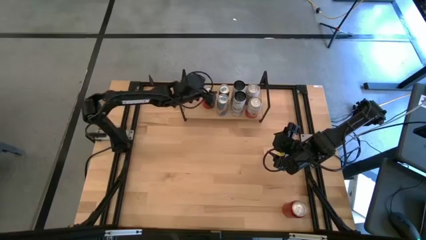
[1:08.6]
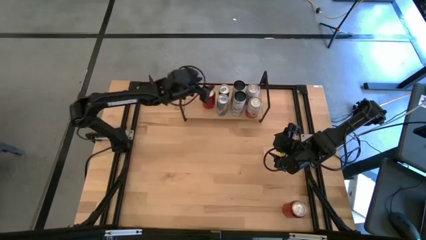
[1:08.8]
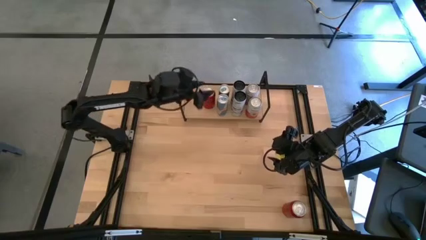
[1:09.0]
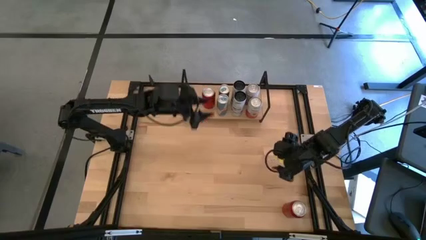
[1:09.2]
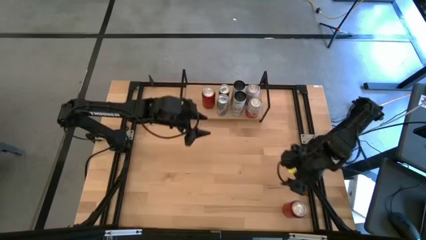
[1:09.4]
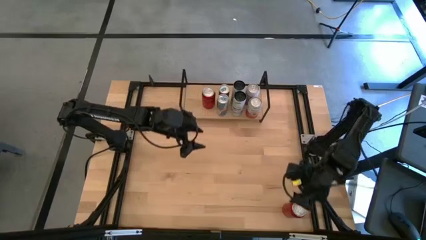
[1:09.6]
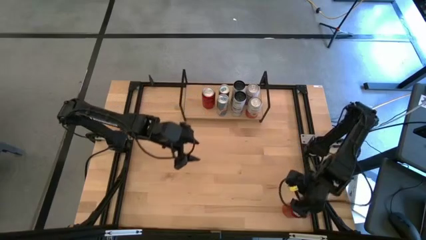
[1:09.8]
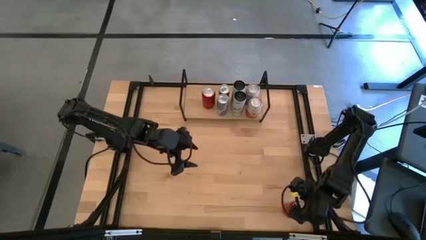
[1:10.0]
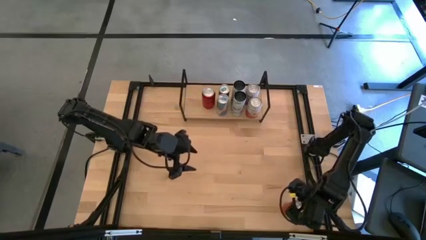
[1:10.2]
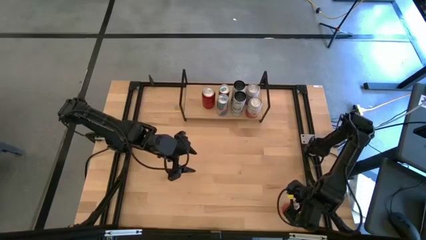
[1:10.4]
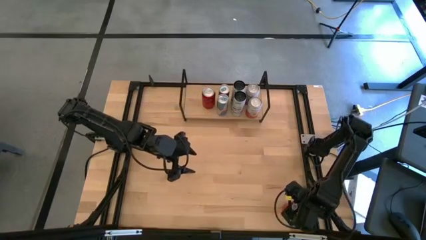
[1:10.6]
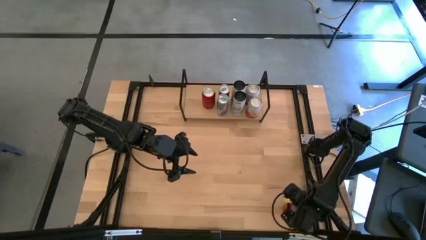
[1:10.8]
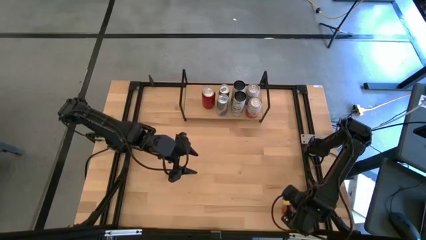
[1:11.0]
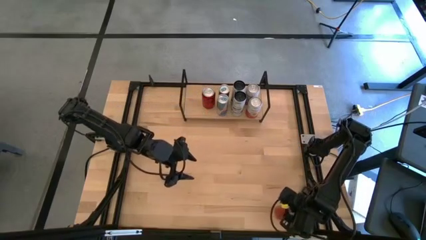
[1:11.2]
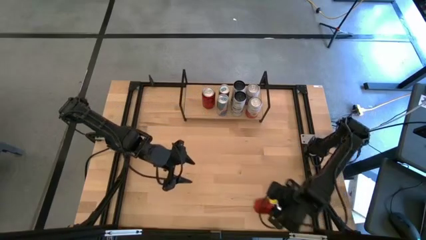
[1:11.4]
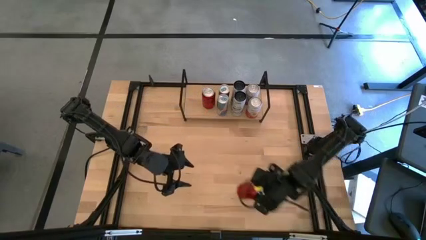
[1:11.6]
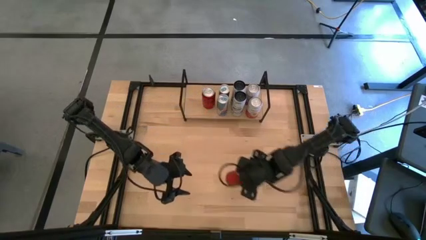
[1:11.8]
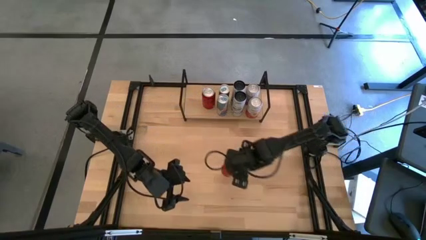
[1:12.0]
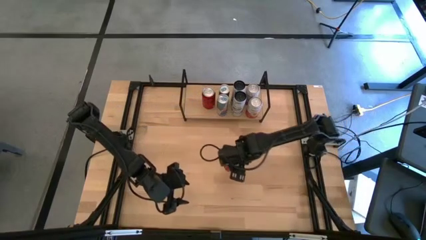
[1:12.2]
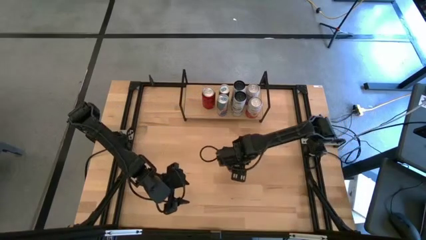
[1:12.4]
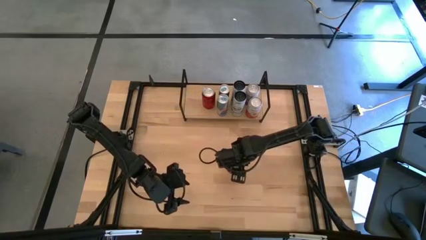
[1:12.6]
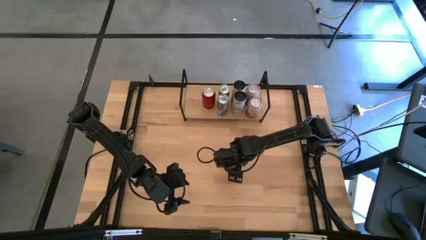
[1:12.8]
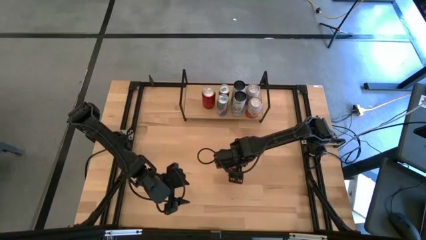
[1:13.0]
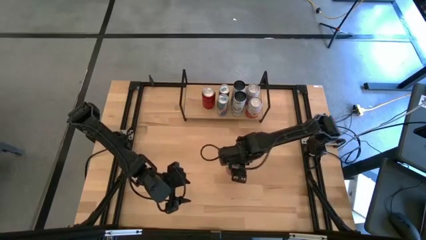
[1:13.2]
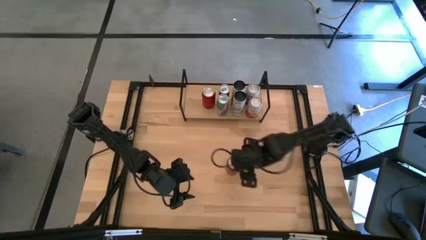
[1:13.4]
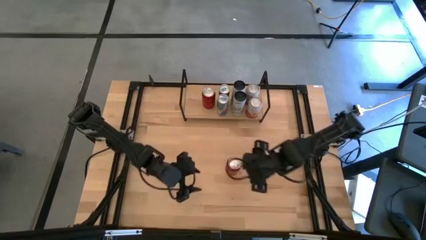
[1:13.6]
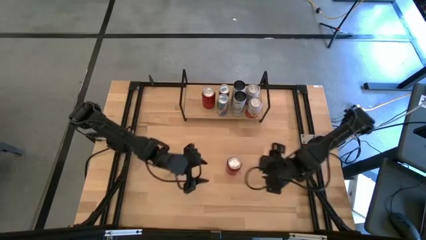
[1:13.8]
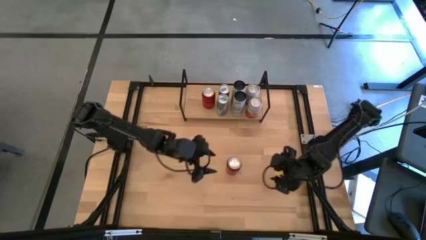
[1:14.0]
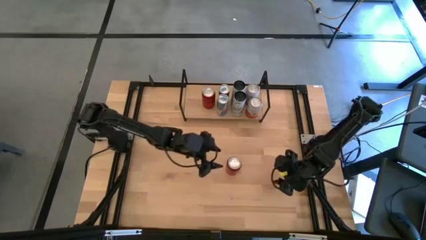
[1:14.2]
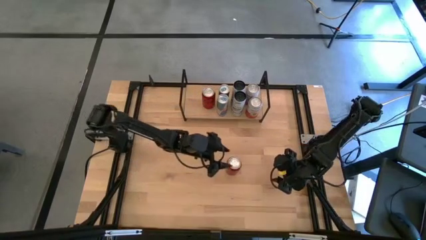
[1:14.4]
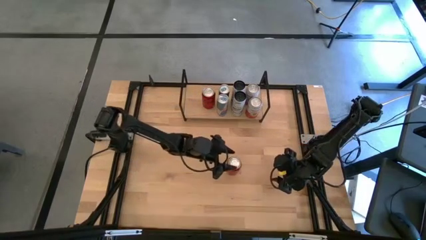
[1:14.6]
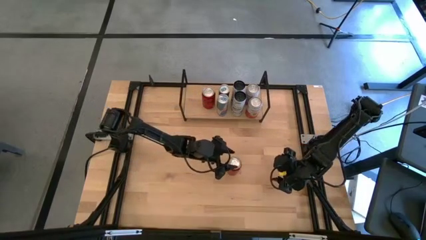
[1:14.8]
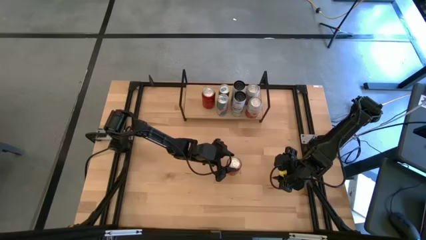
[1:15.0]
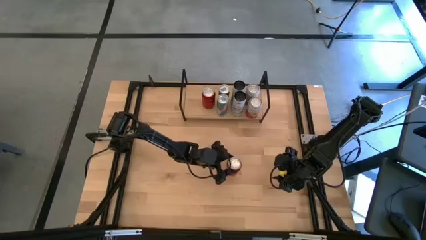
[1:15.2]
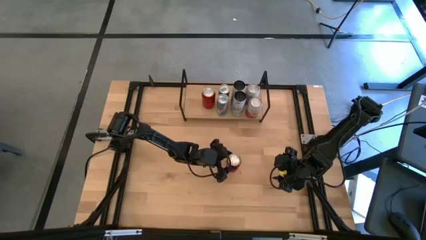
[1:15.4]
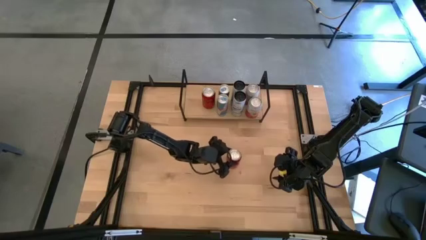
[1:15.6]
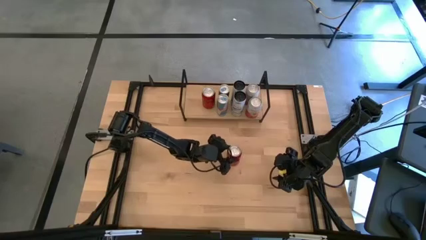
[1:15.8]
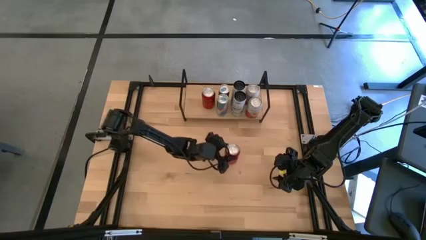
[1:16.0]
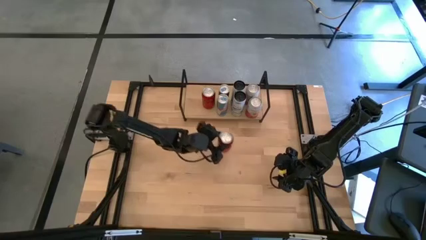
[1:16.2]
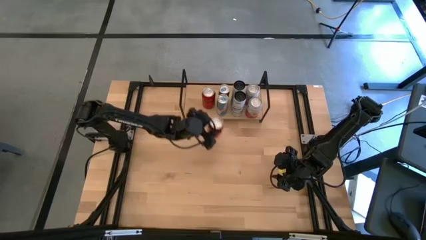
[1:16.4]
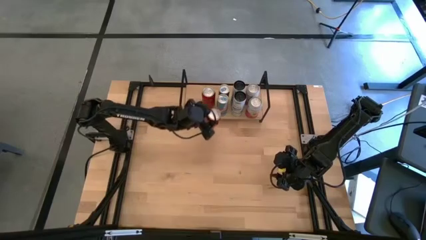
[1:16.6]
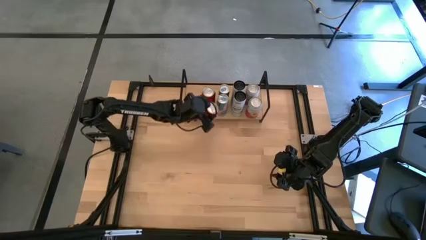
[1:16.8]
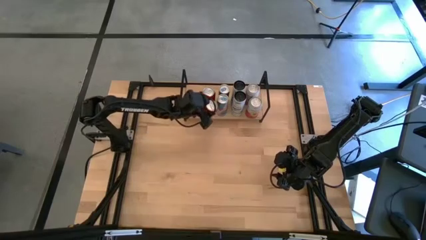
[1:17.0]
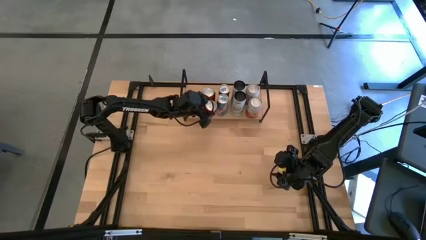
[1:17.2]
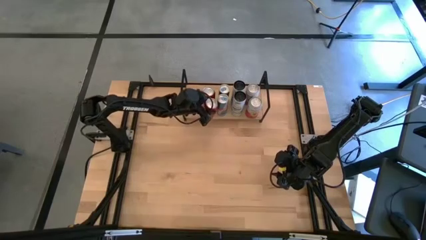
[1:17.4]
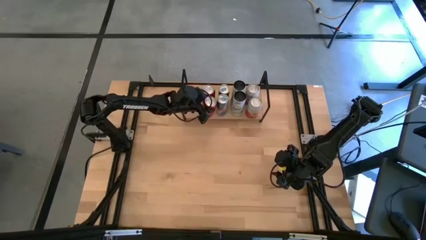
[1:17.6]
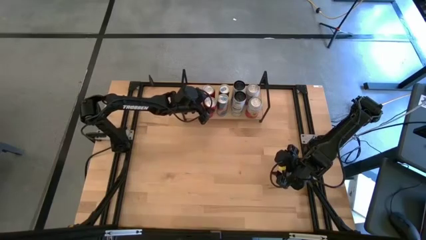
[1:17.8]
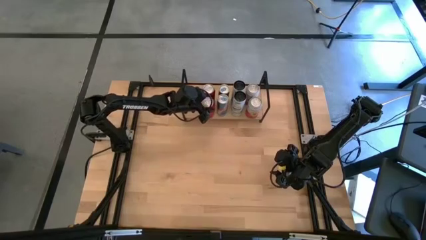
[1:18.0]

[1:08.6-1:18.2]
Task: Place canned beverage on shelf
Put the red soda can on the shelf

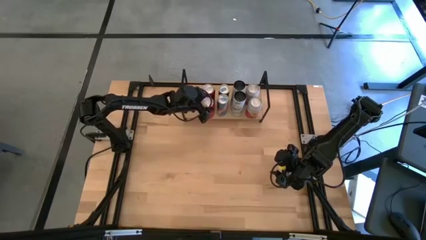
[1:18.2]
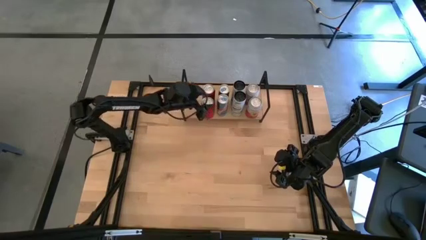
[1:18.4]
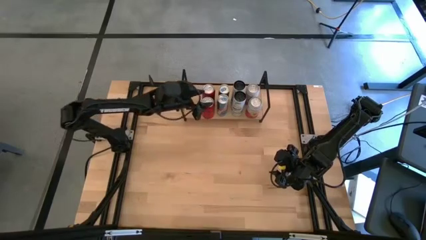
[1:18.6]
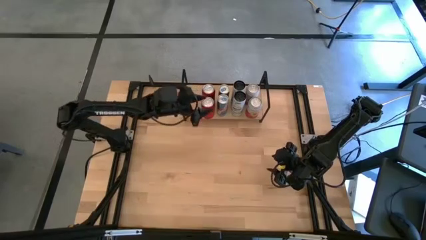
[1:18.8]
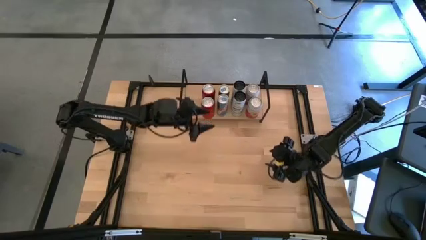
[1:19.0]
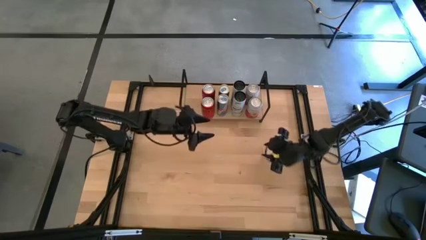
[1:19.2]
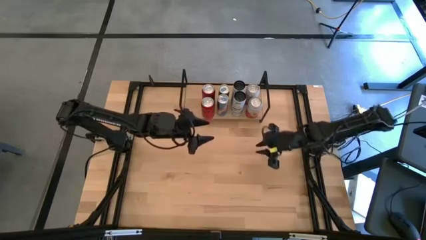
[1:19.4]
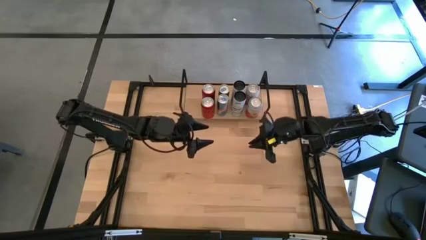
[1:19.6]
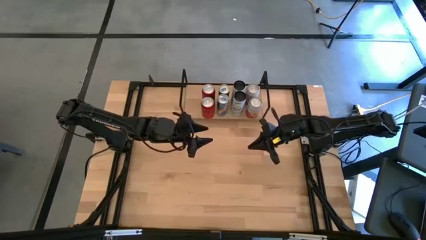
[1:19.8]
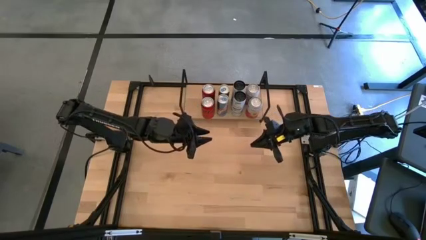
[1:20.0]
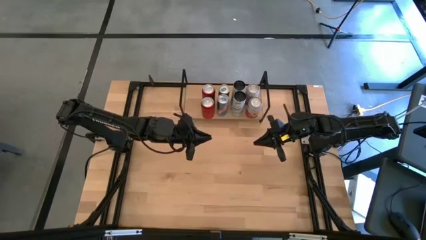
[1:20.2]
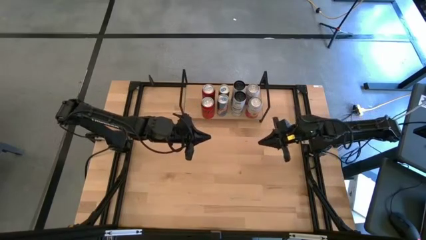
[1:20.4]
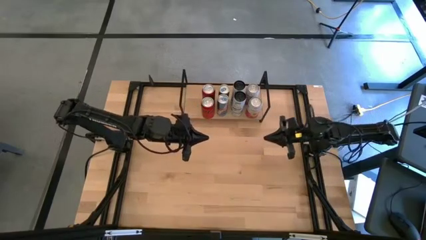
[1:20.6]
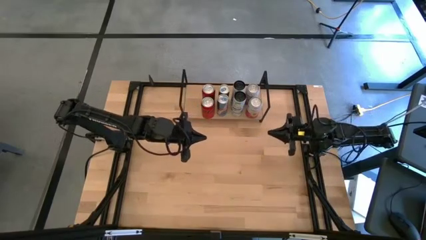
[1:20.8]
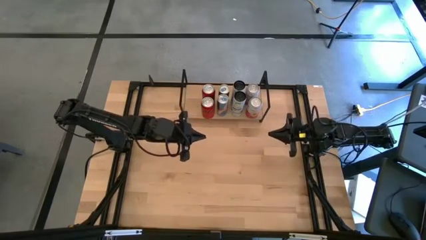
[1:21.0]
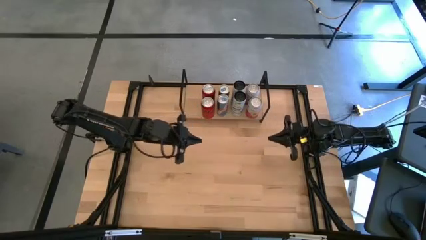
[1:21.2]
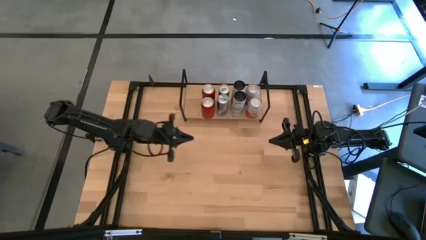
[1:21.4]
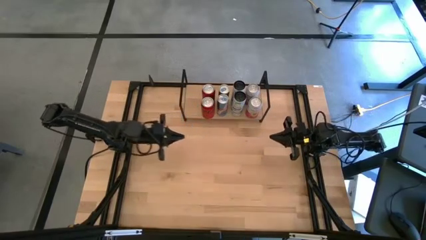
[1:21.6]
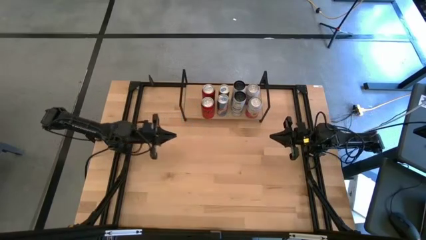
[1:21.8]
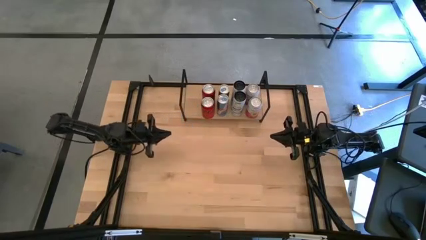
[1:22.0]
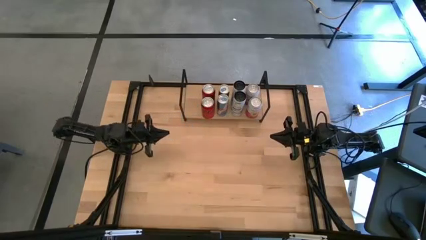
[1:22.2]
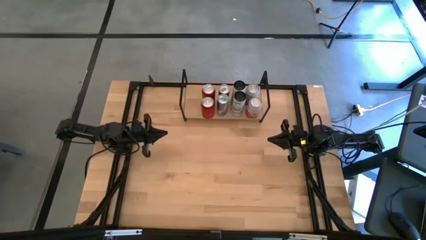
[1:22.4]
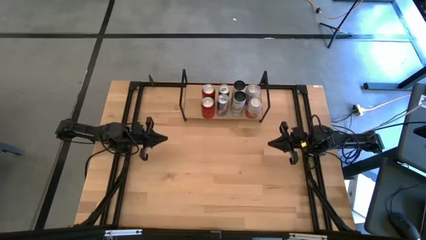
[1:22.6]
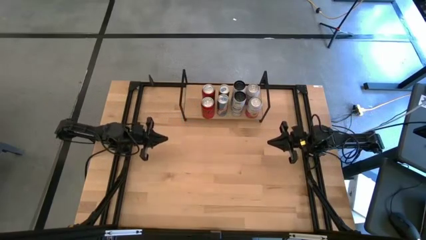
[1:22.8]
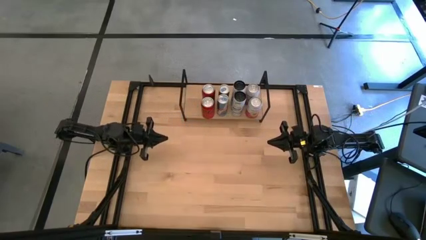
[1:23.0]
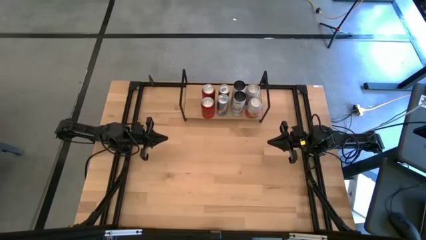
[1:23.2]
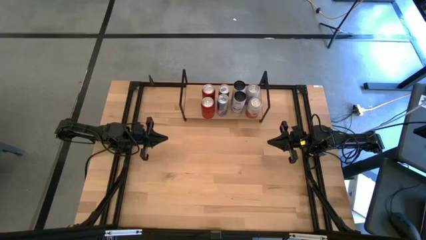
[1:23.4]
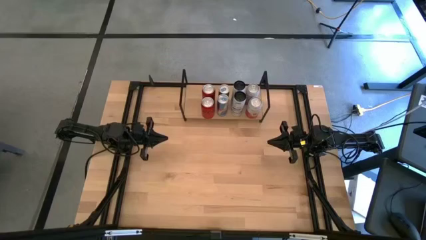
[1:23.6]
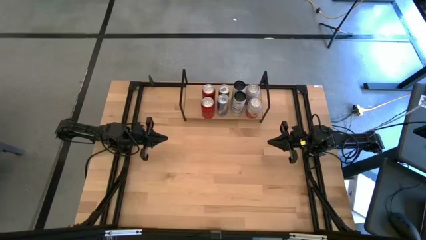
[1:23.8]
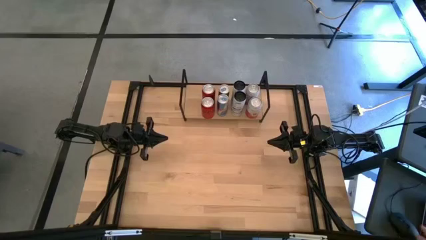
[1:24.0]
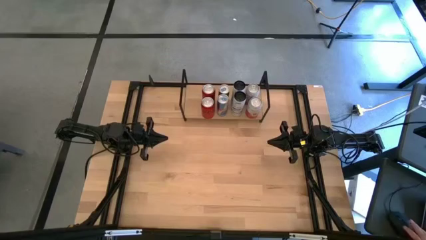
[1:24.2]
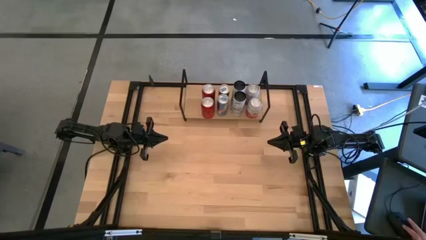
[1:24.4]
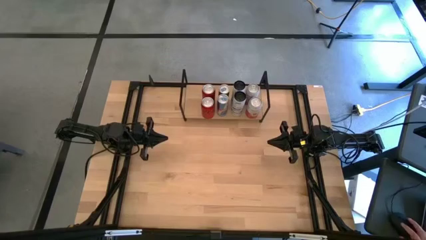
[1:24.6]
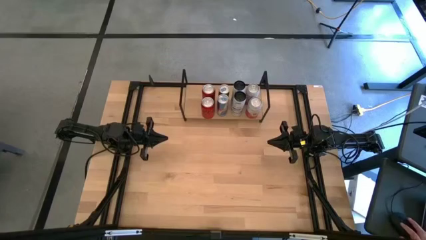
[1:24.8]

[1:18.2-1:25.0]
Return to Home Position

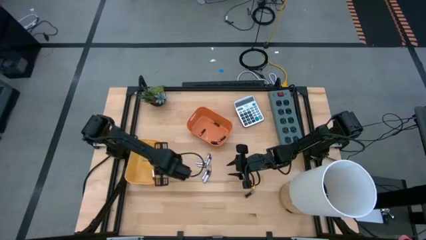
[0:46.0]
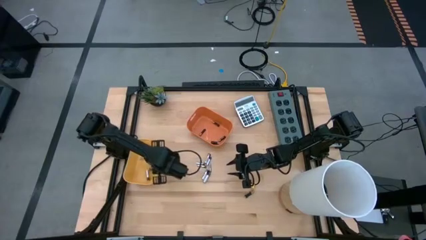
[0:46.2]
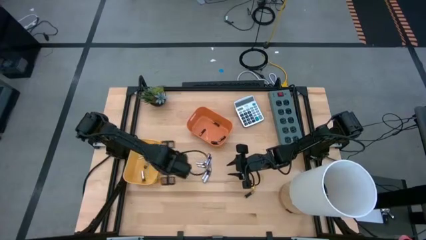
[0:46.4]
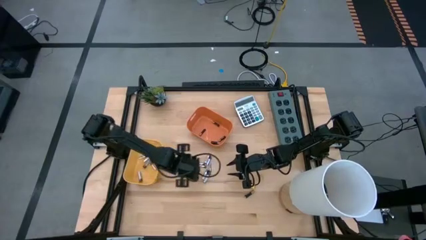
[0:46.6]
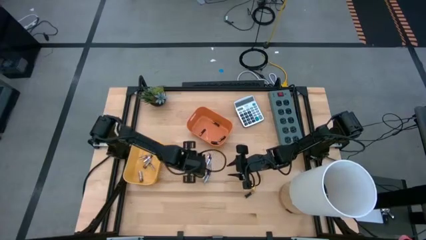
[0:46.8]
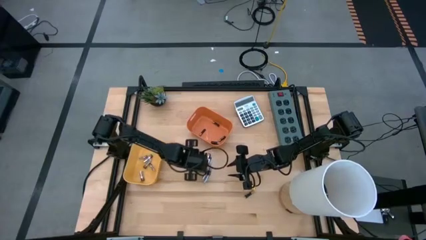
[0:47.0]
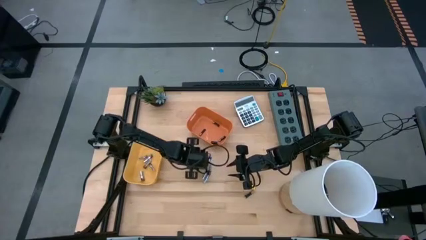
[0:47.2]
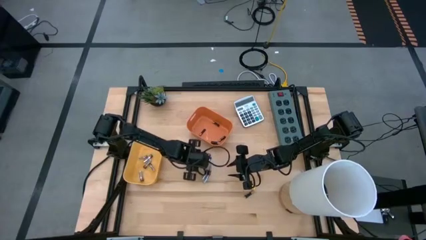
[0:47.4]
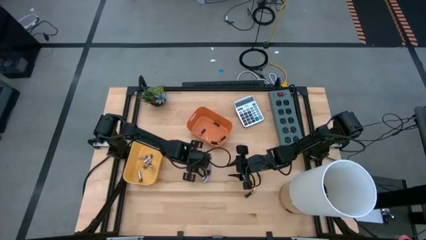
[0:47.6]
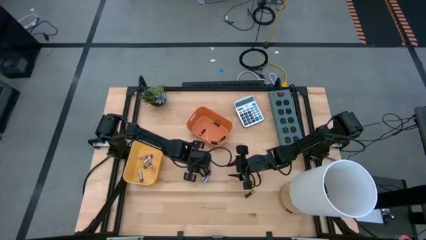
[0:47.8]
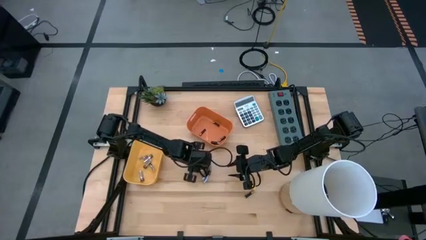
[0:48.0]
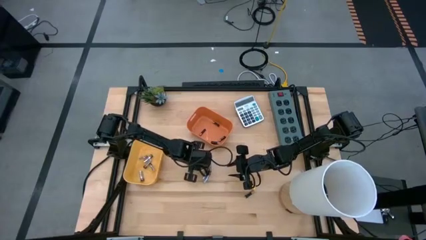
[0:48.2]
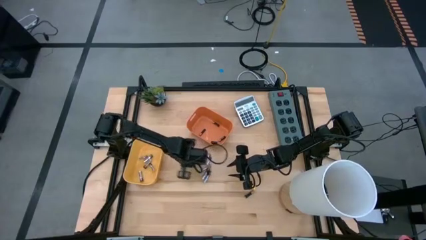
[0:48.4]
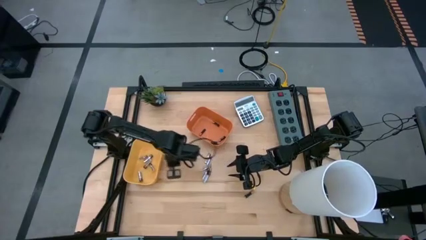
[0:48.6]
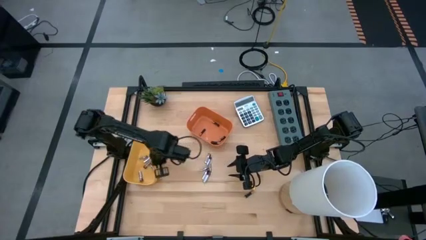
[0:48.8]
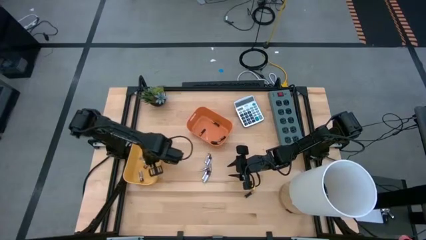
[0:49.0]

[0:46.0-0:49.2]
Task: Sort batteries
Put the silver battery into the yellow bin
